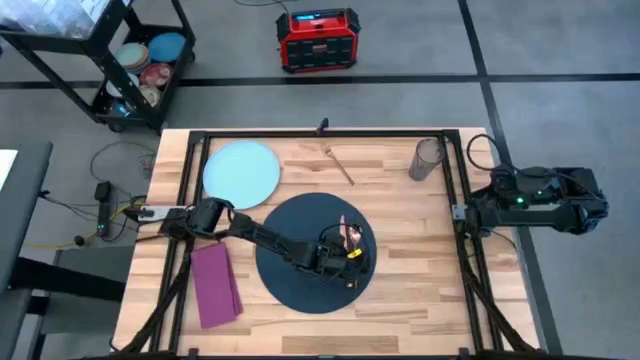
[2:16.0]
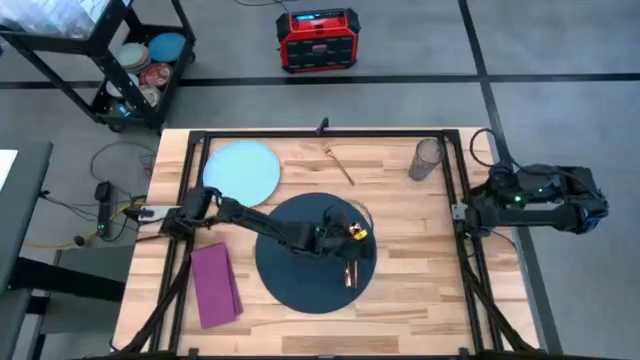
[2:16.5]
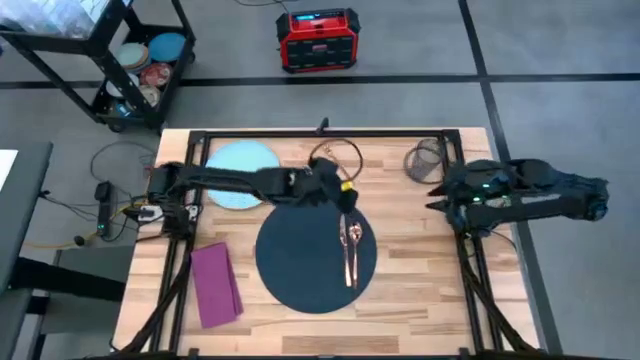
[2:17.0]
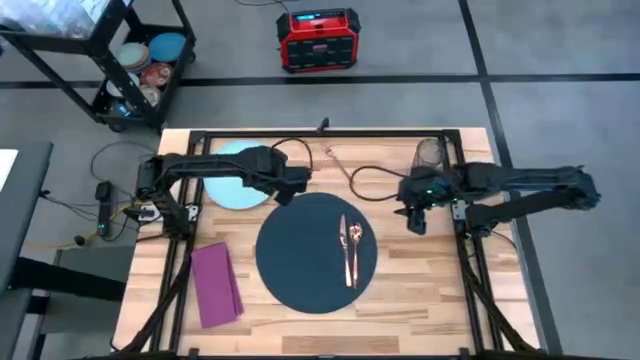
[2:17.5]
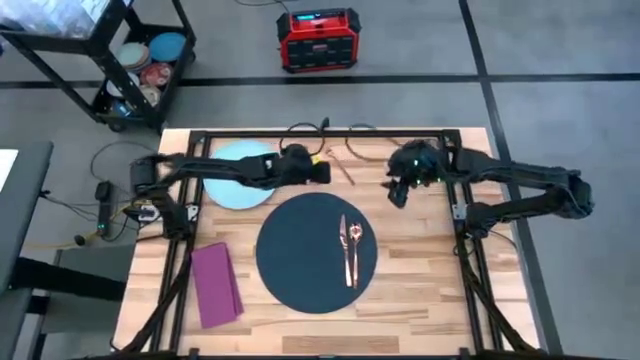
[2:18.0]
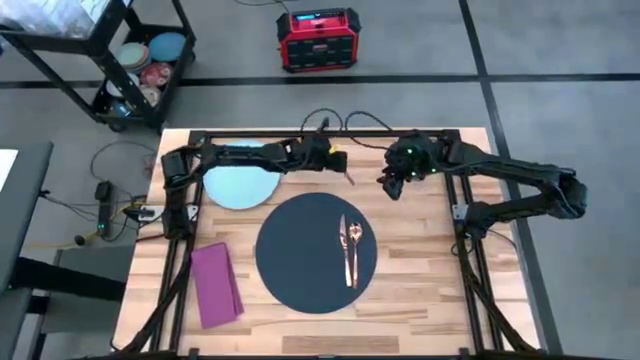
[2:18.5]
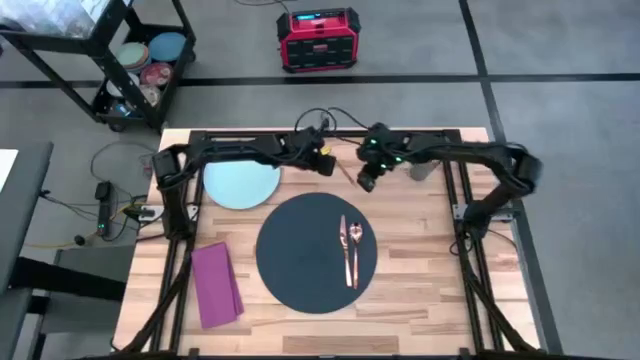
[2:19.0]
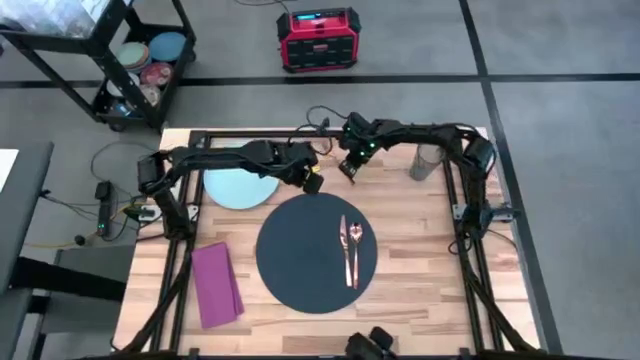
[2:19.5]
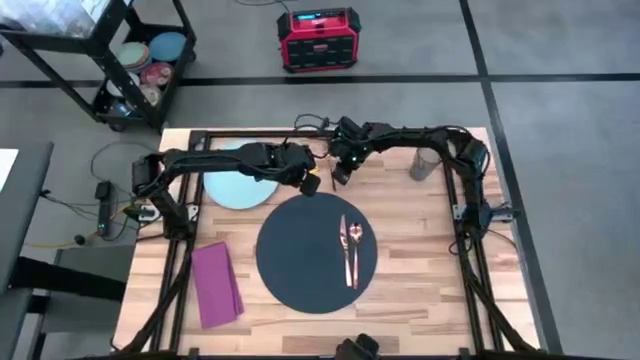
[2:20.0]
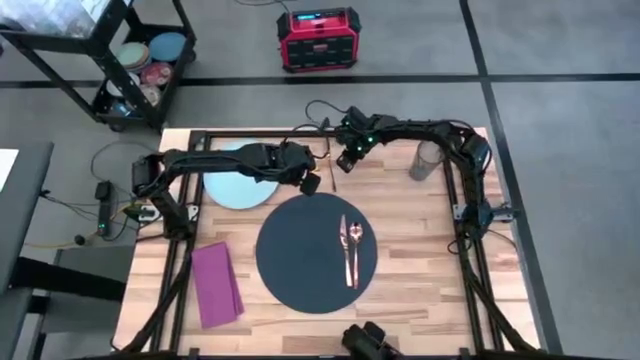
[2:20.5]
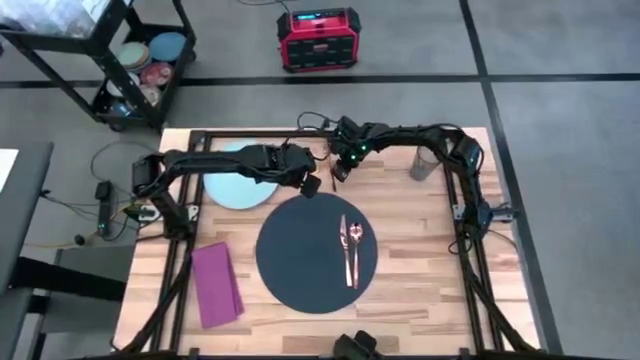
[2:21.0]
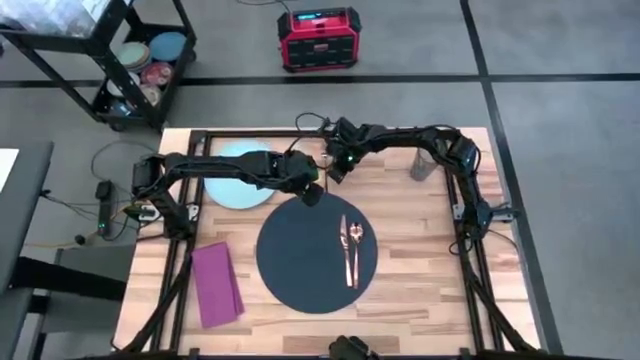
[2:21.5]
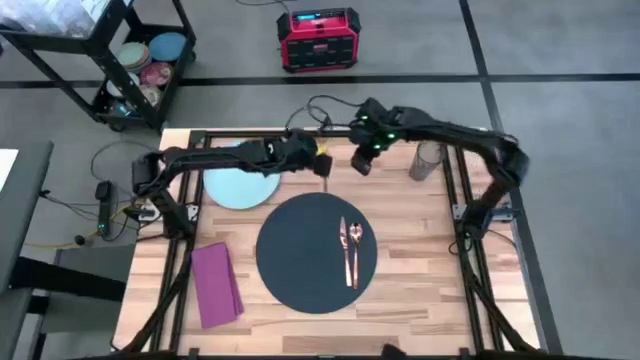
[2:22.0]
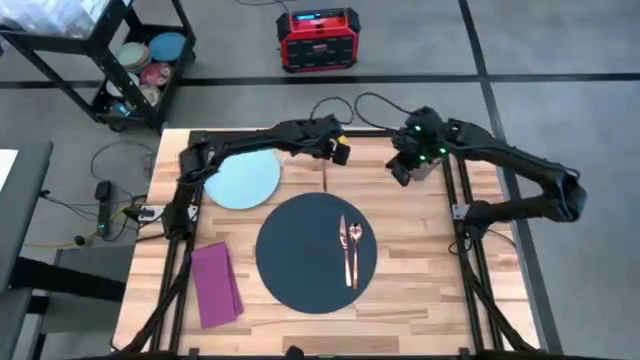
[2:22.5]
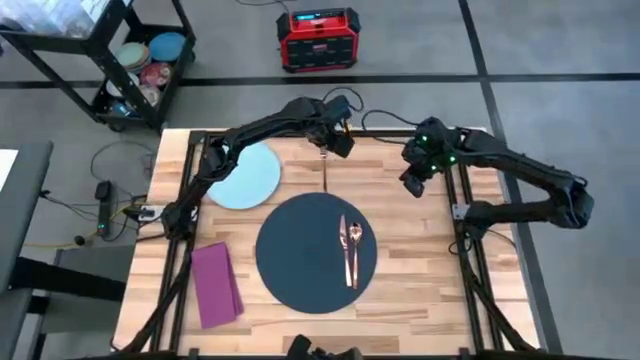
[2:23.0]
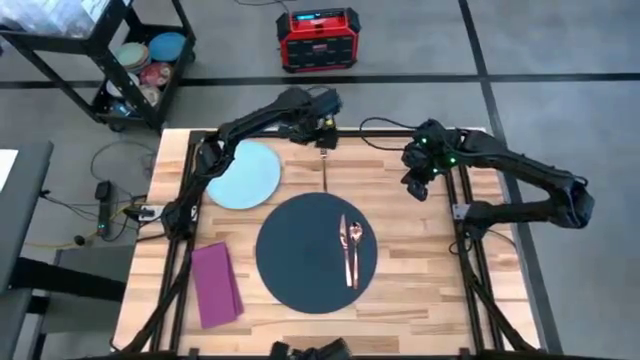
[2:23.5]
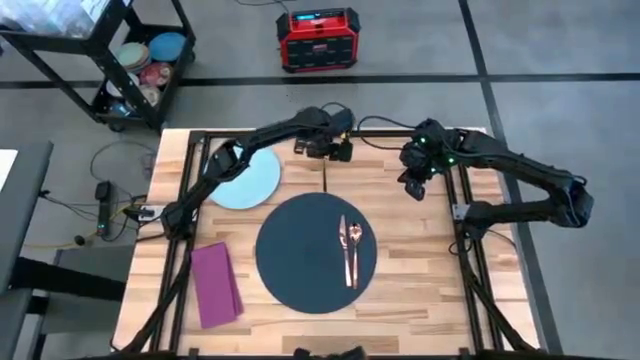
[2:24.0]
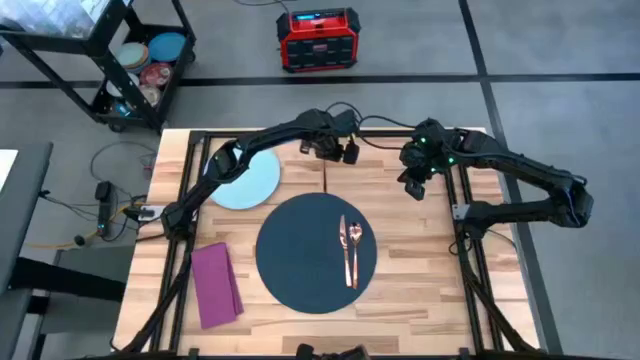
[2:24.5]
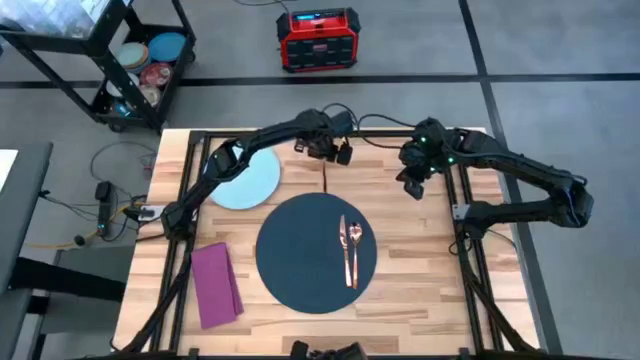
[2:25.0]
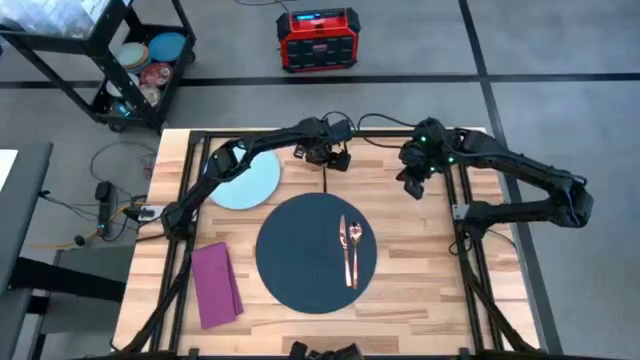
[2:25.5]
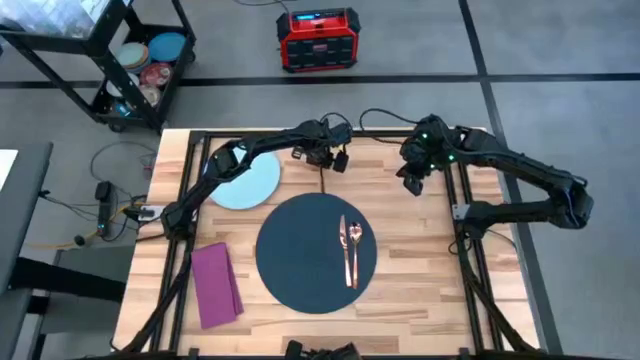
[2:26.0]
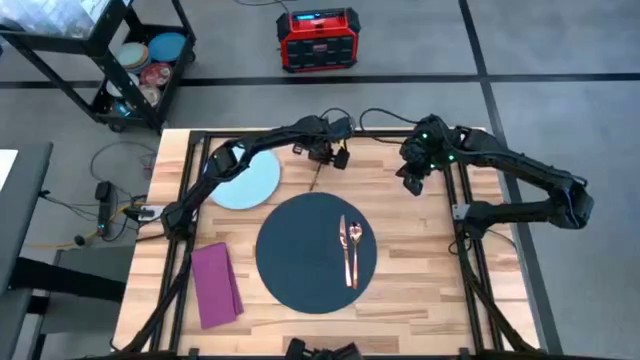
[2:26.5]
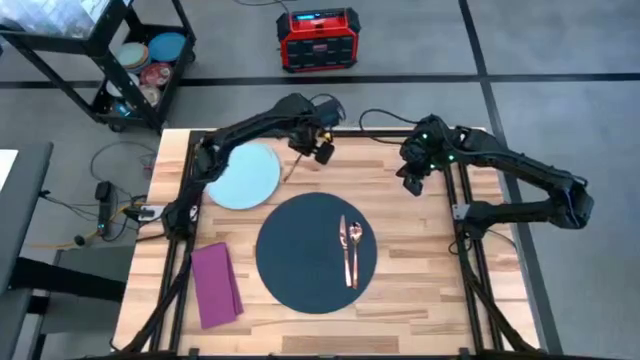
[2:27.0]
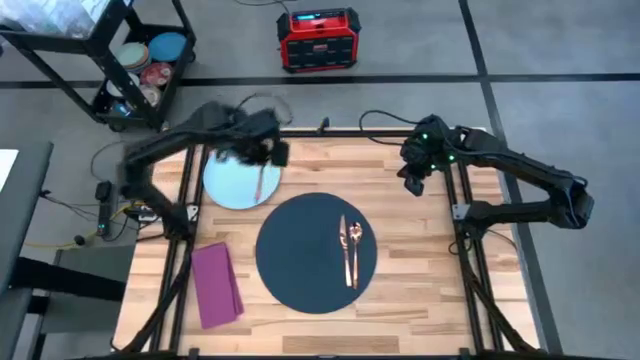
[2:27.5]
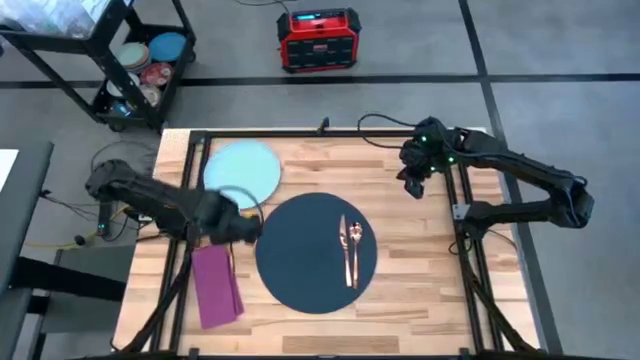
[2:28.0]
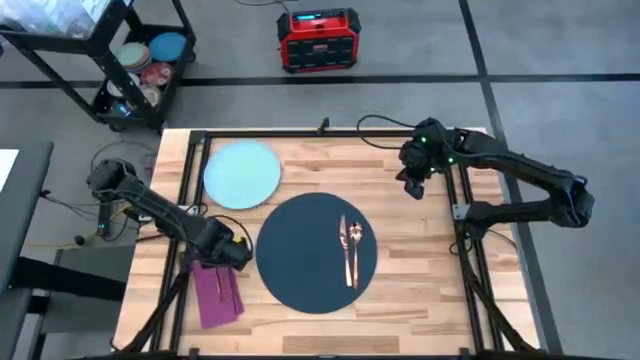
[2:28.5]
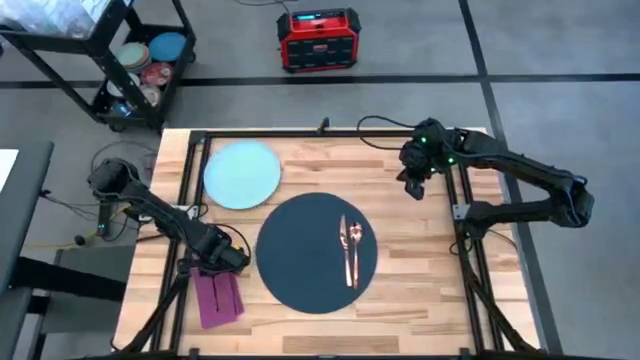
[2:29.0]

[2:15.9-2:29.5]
Task: Set table place
Put the brown fork on top of the pink table napkin

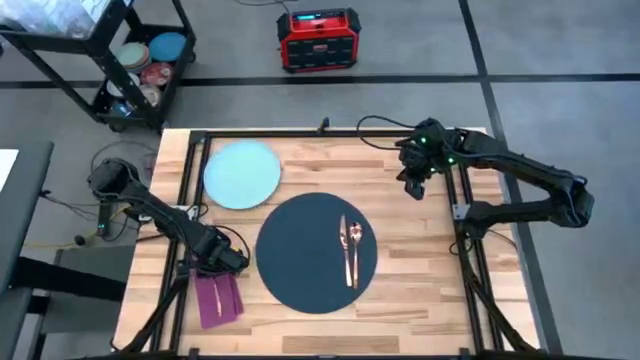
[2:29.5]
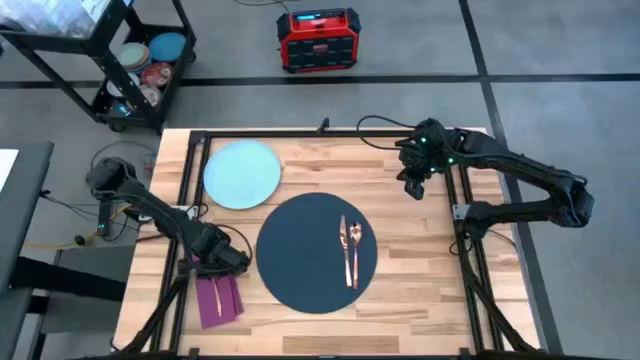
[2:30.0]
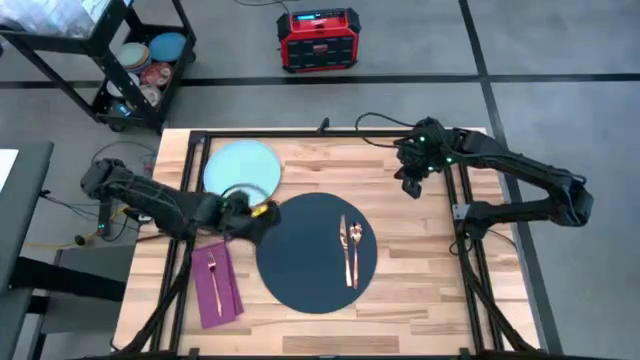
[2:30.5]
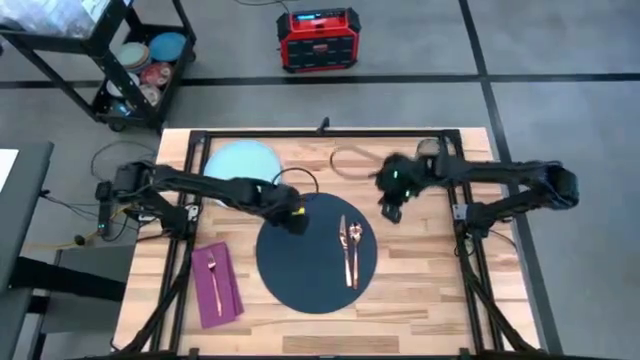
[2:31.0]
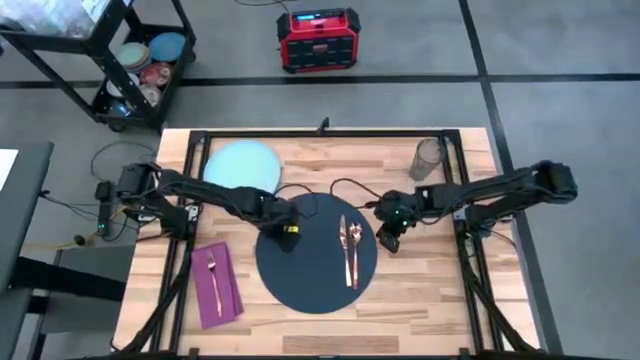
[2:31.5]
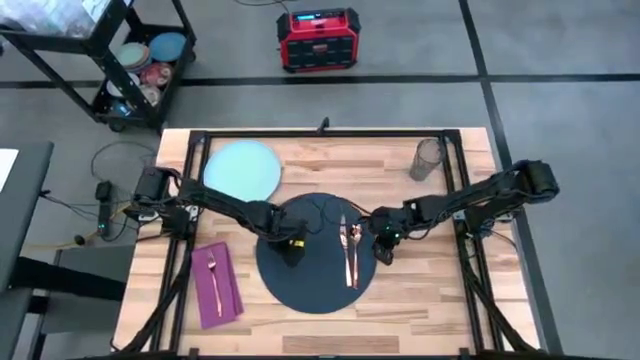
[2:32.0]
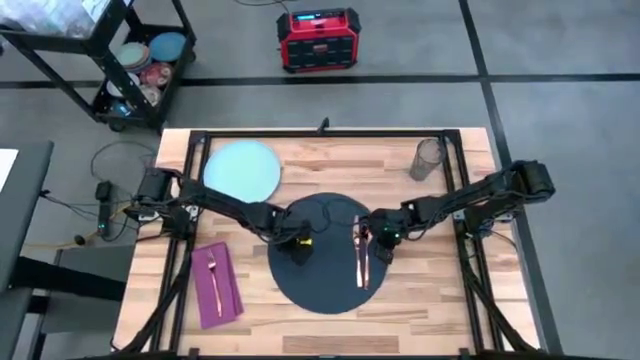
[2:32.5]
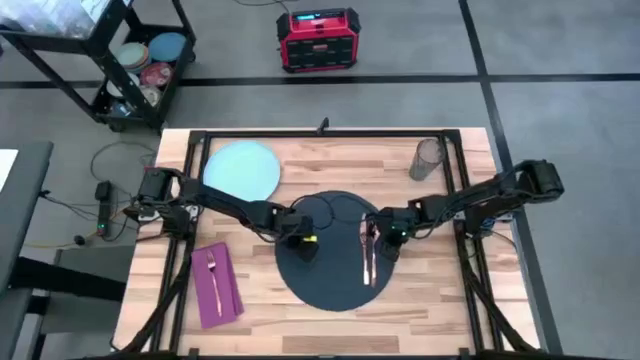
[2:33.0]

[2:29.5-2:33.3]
Adjust the blue table mat on the table

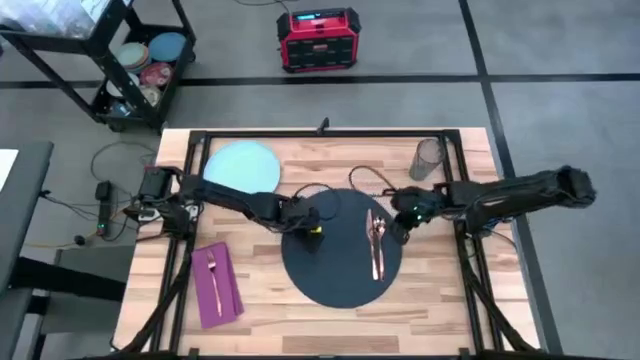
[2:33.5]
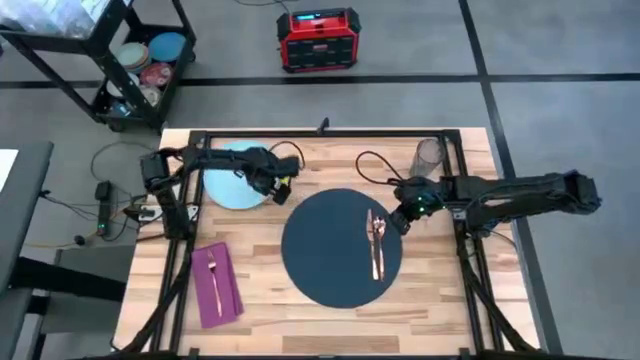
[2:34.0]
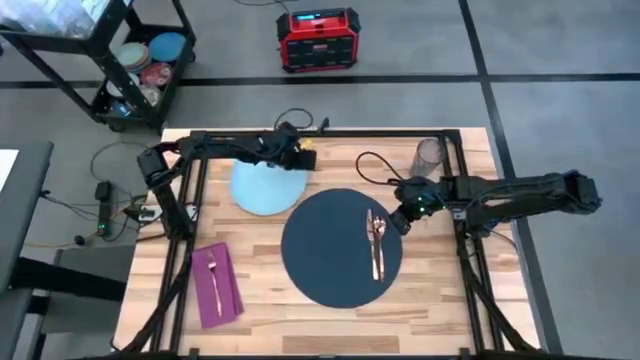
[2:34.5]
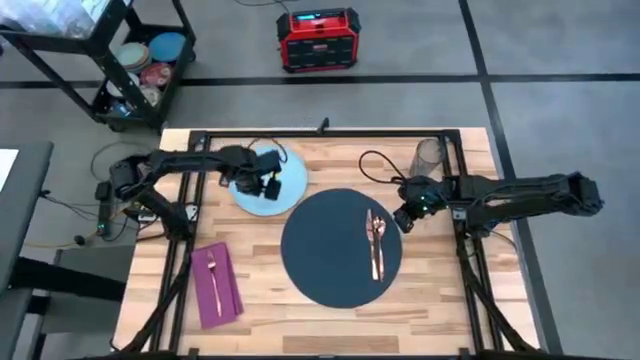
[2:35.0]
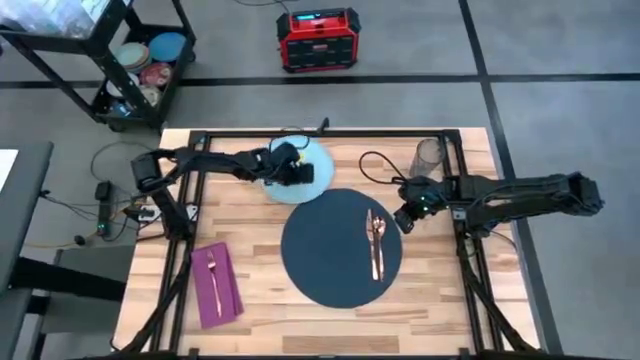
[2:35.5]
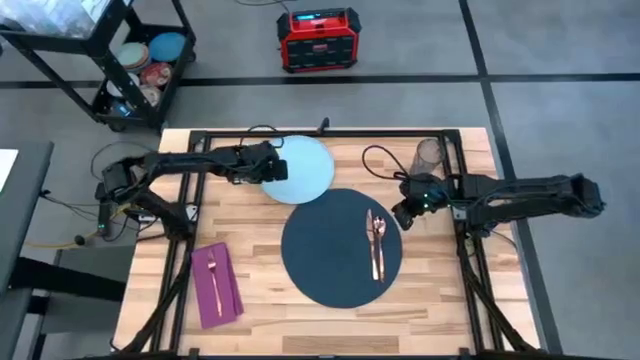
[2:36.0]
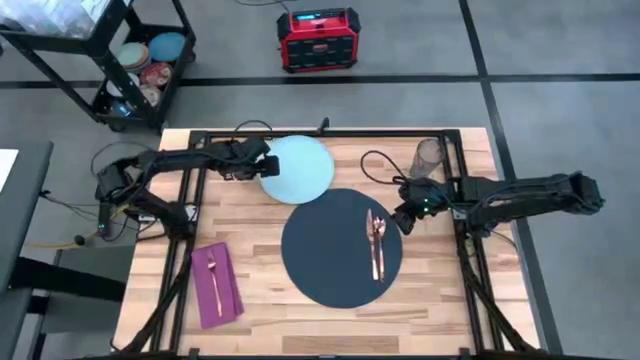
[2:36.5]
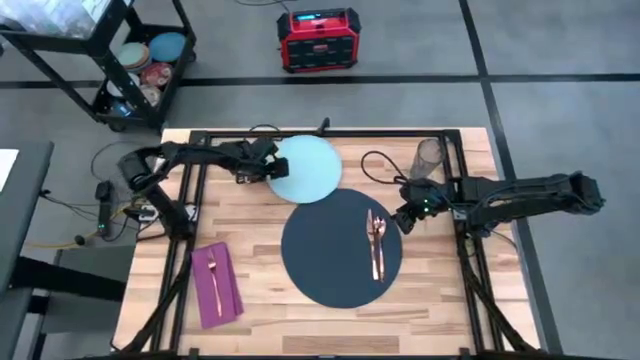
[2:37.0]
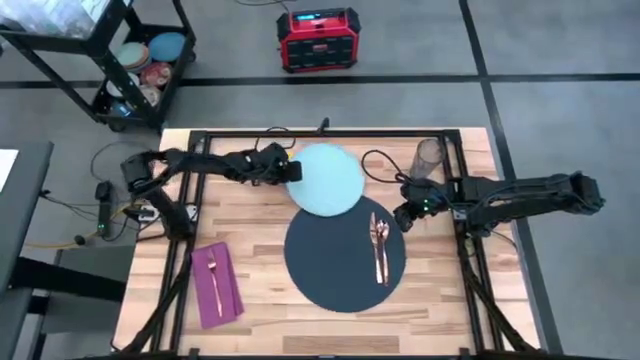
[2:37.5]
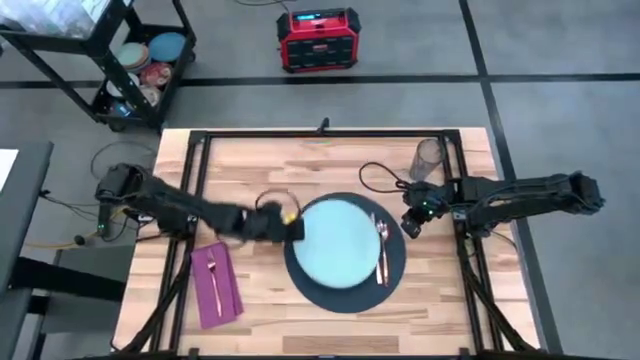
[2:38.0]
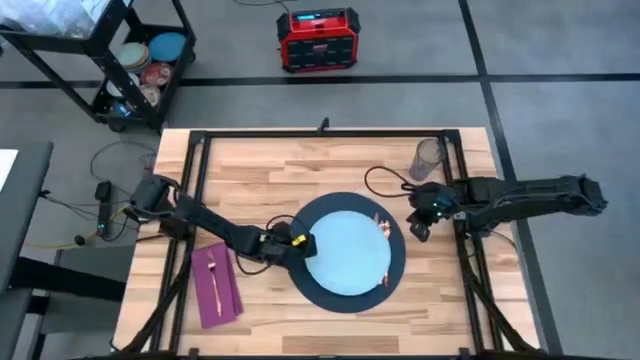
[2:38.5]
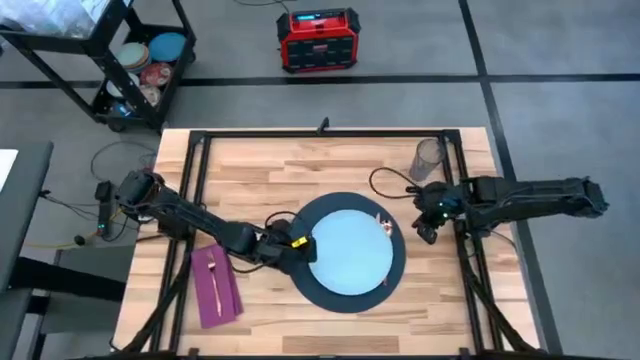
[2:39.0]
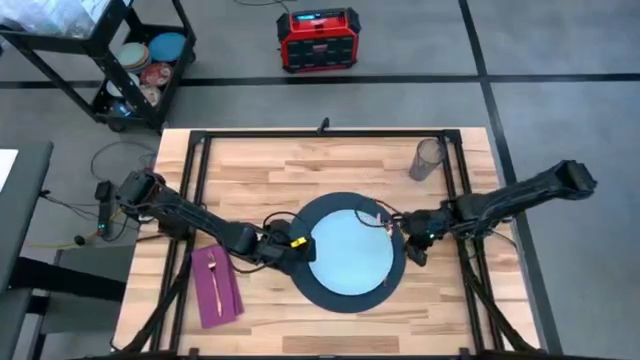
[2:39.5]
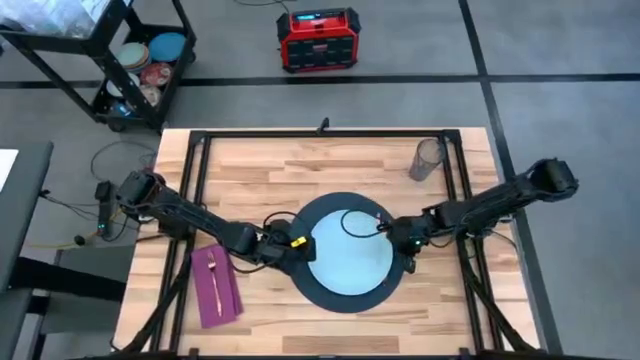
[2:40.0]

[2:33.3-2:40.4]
Put the light blue plate on the blue table mat to the left of the brown table knife
